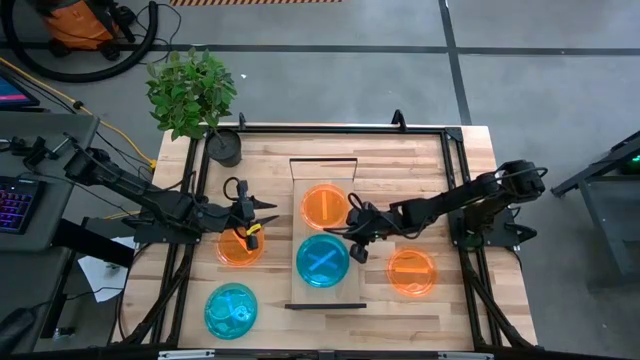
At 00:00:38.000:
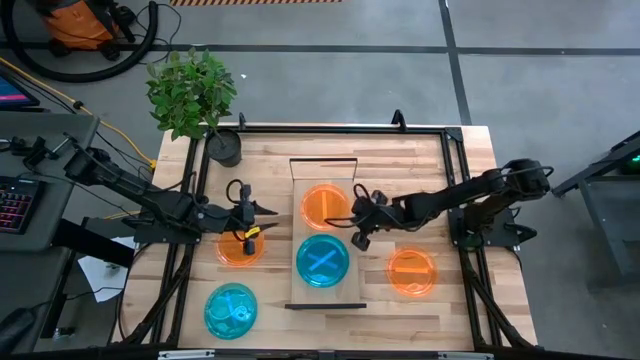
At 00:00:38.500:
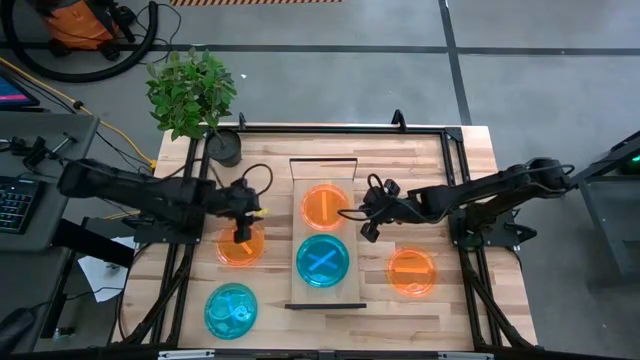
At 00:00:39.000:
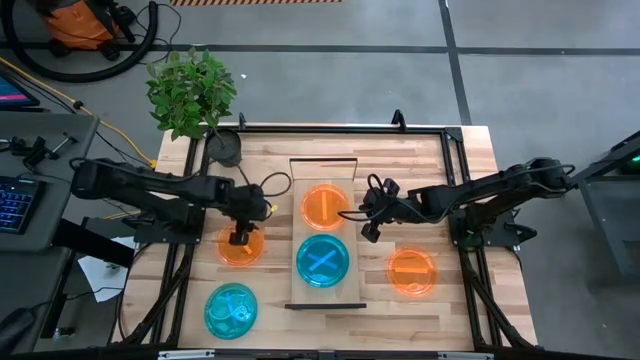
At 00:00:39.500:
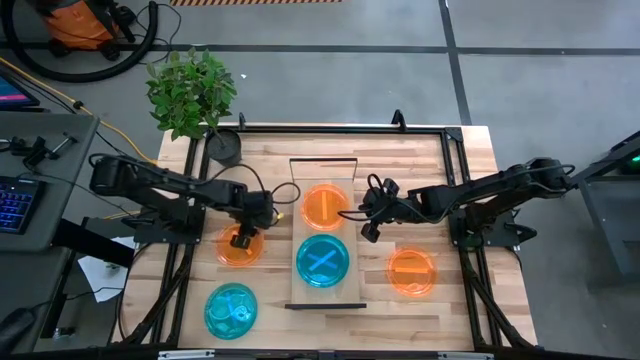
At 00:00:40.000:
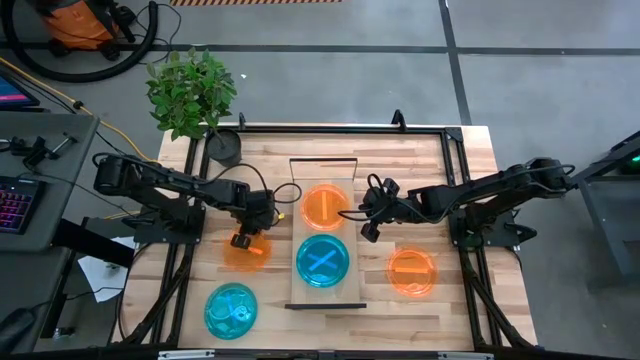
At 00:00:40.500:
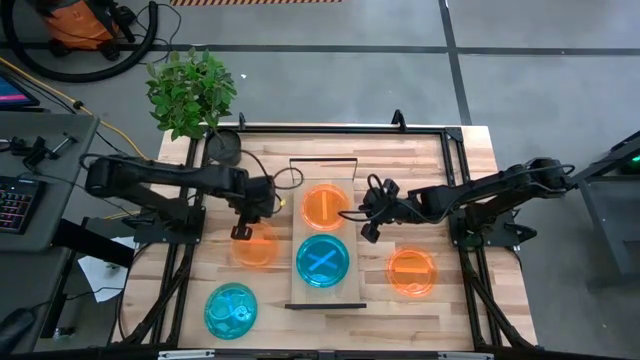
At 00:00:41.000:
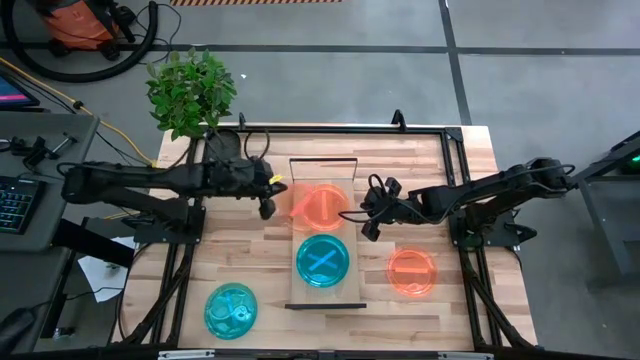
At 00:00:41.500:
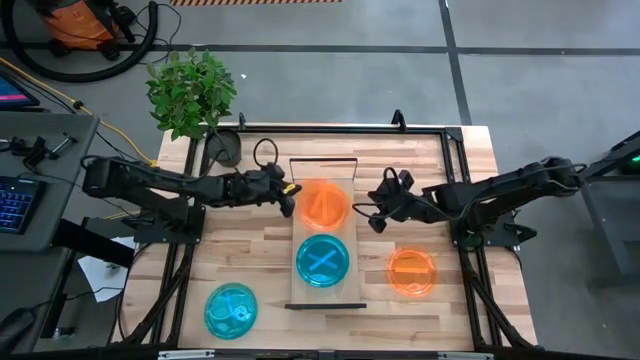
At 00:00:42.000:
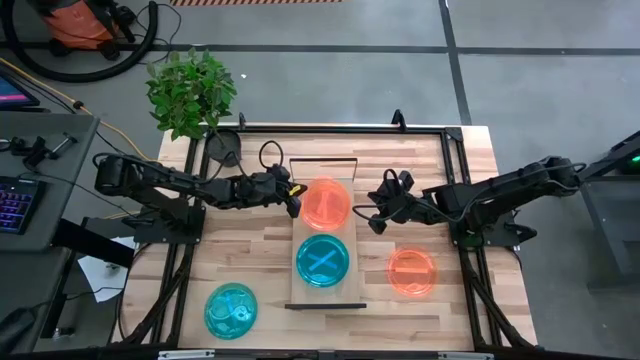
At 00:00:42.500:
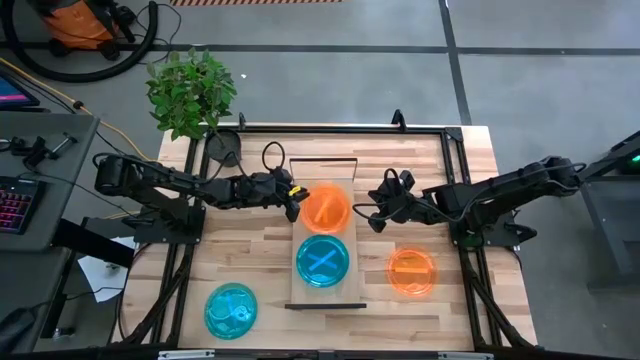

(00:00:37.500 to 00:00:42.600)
Task: Place and stack plates onto a shelf
Stack the left orange plate on top of the other orange plate on the shelf

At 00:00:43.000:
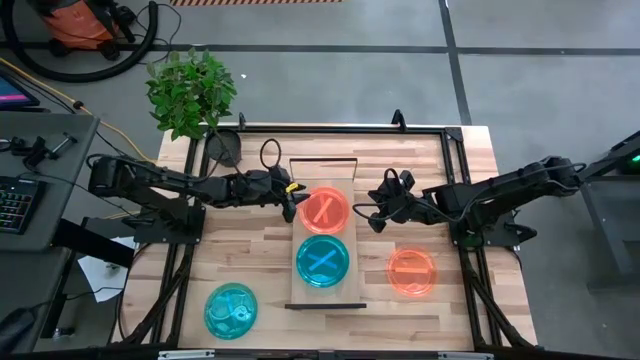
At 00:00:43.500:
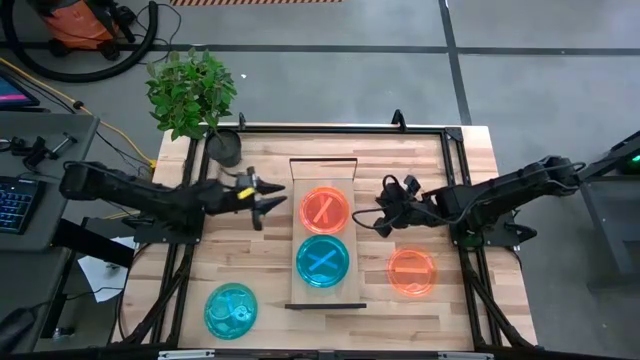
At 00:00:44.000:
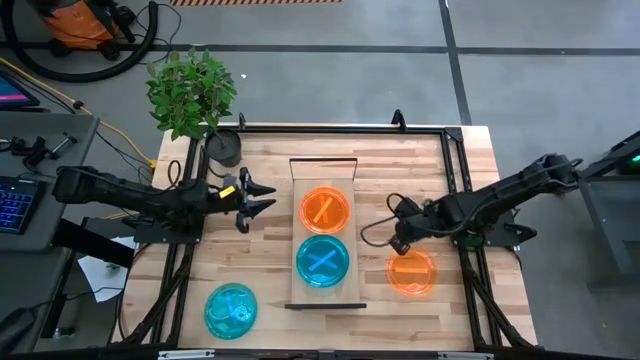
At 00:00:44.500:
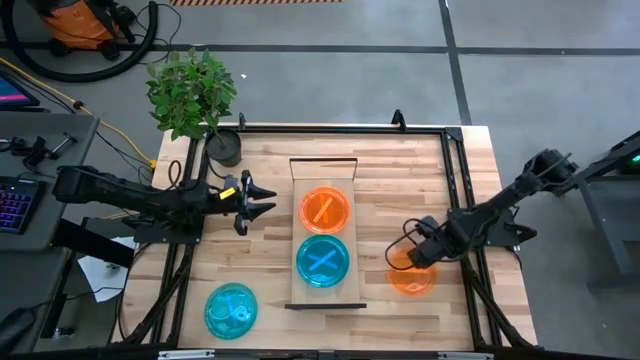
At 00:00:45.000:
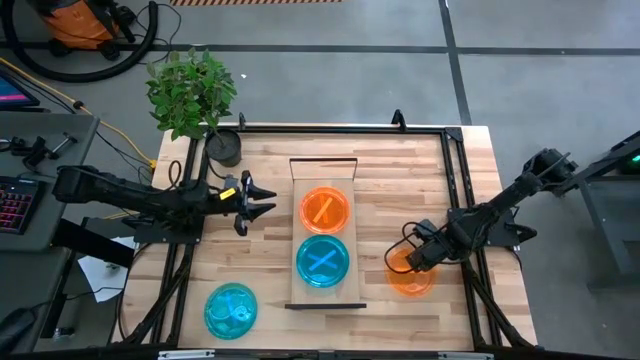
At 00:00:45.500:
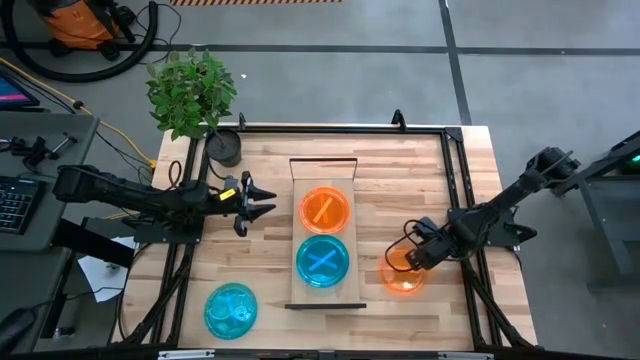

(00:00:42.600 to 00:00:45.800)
Stack the orange plate on top of the other orange plate on the shelf

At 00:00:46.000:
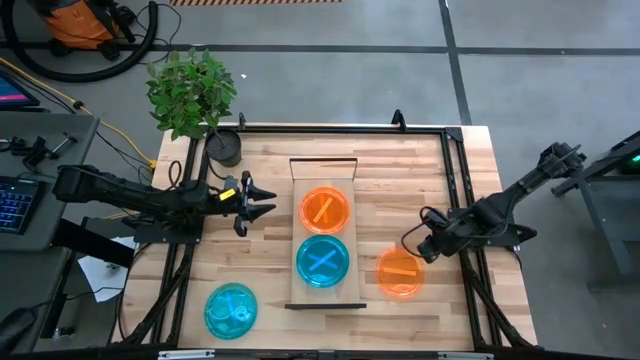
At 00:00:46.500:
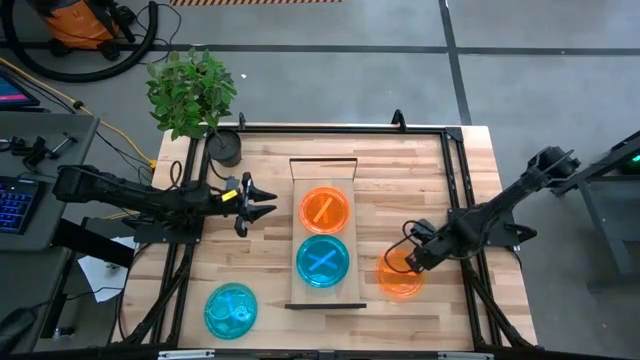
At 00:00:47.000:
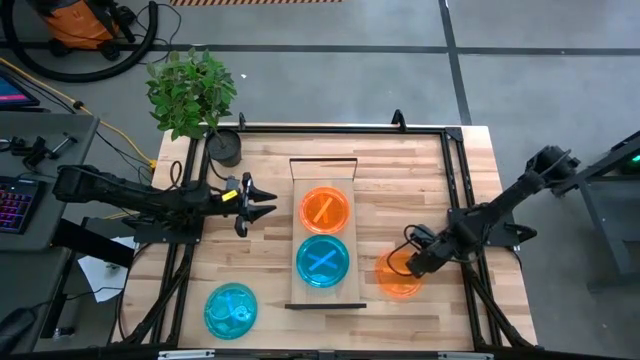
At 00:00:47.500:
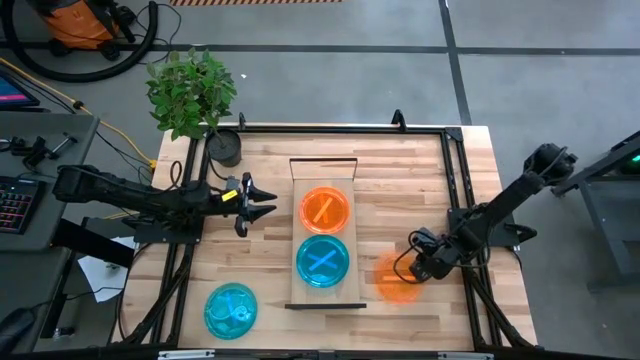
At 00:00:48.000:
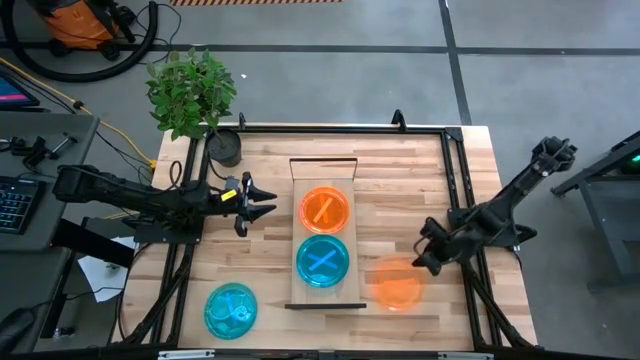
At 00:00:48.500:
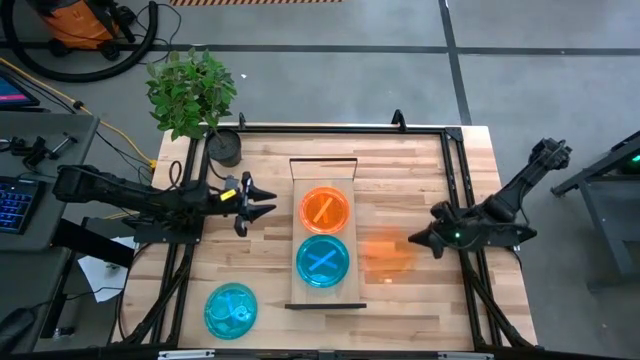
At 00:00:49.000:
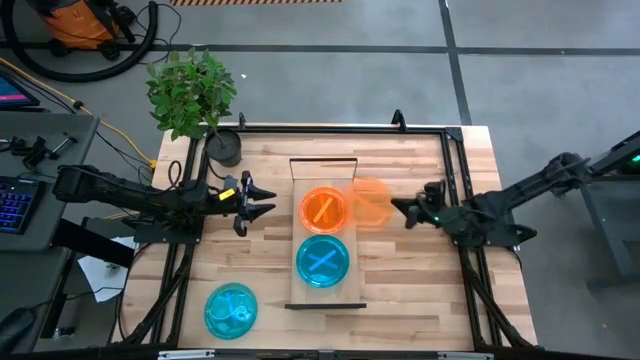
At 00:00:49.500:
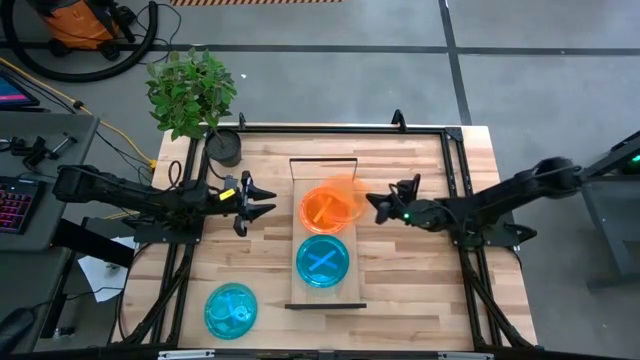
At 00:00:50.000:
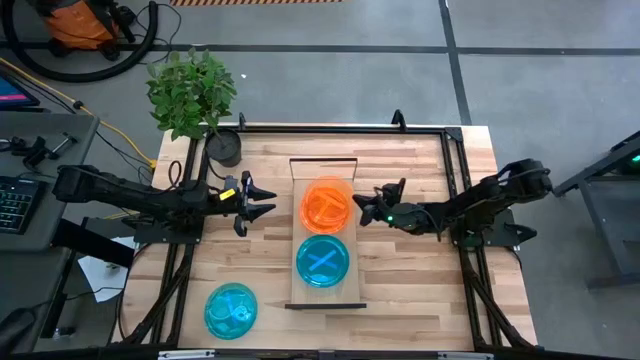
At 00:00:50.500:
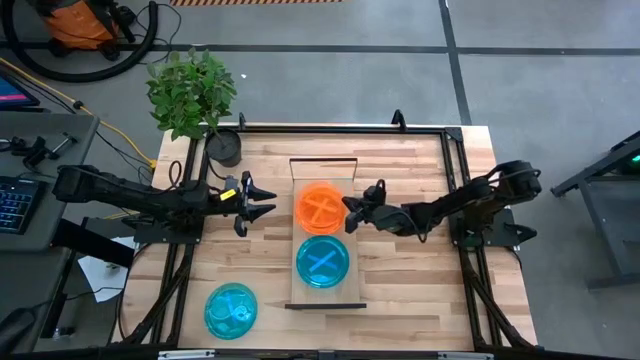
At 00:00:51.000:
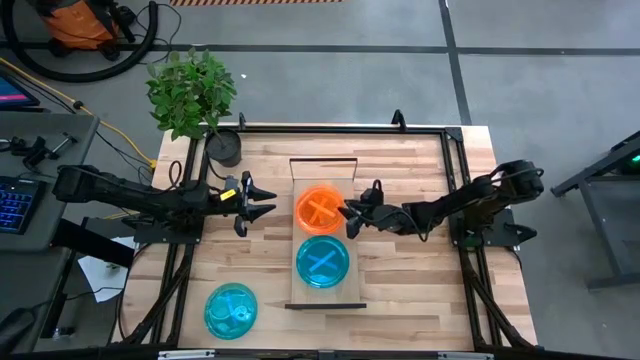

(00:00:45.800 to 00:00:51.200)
Stack the orange plate on top of the other orange plate on the shelf

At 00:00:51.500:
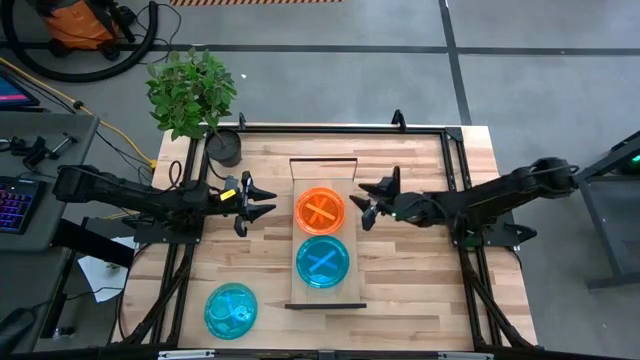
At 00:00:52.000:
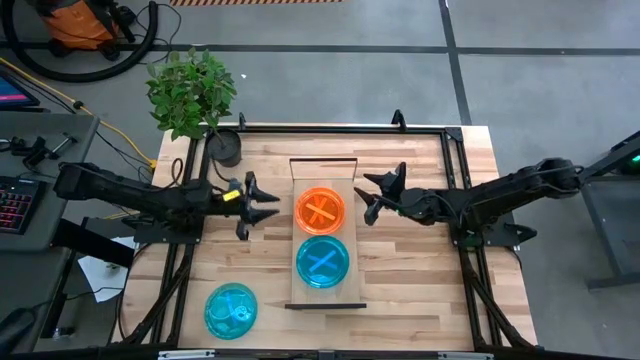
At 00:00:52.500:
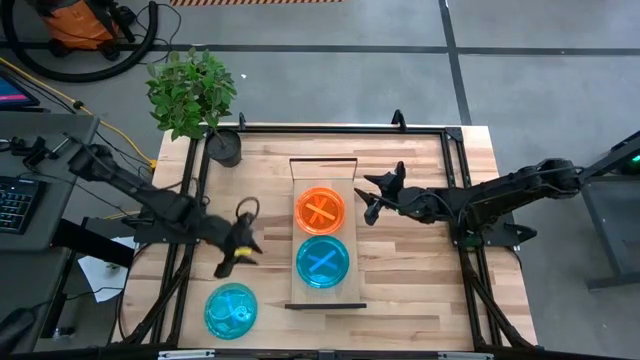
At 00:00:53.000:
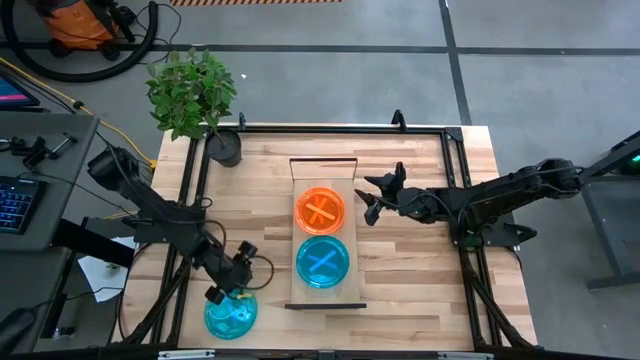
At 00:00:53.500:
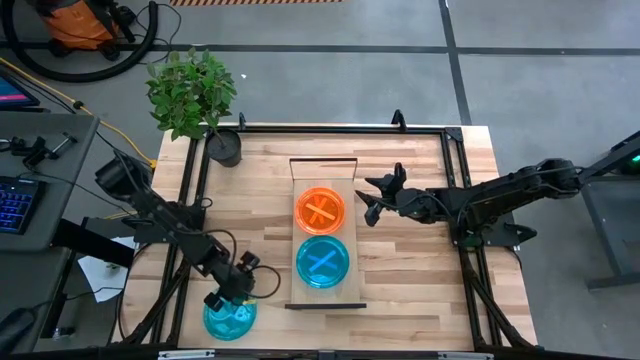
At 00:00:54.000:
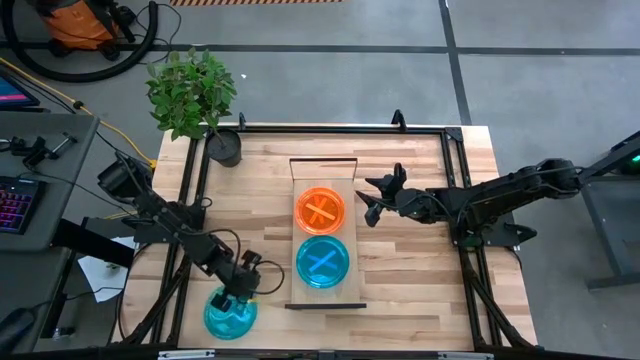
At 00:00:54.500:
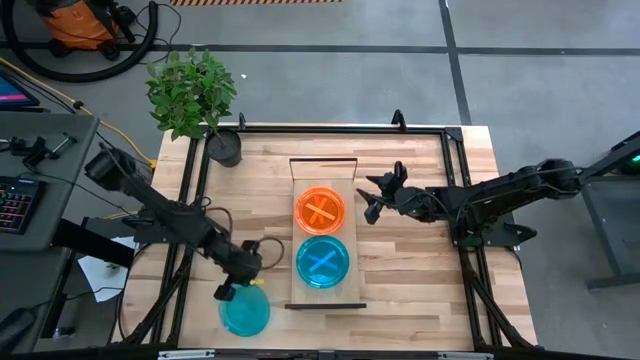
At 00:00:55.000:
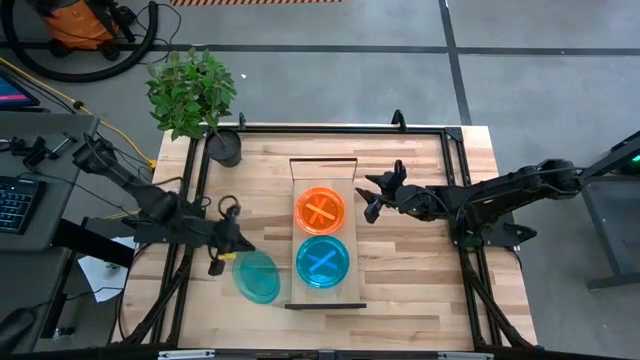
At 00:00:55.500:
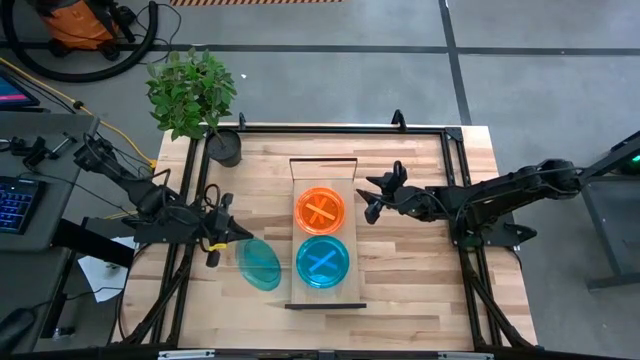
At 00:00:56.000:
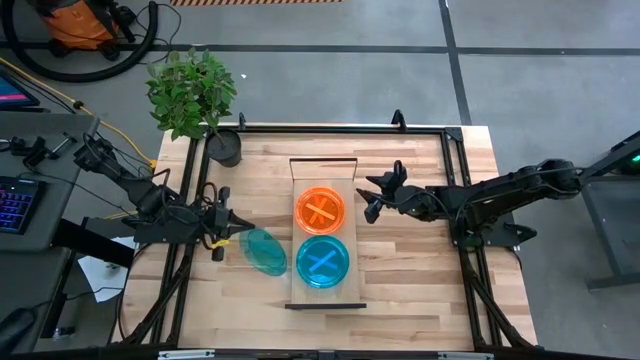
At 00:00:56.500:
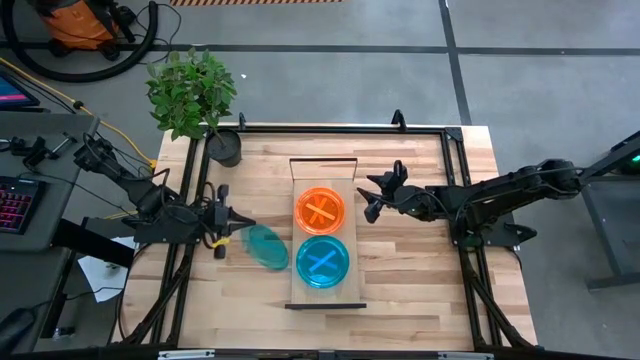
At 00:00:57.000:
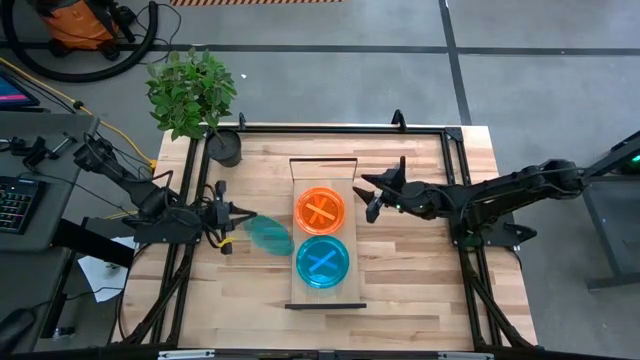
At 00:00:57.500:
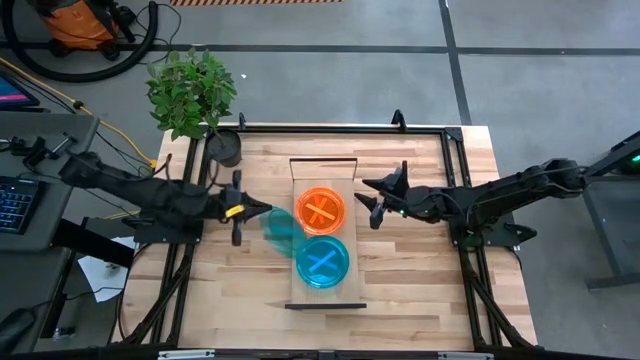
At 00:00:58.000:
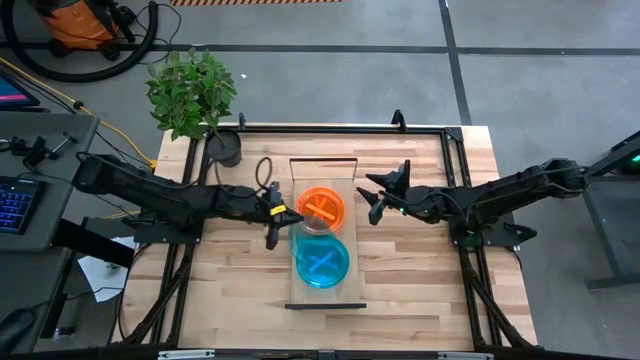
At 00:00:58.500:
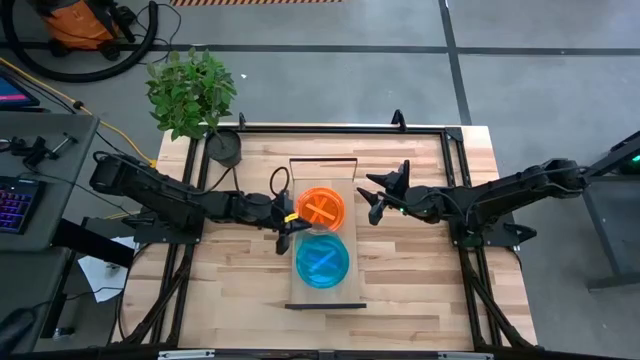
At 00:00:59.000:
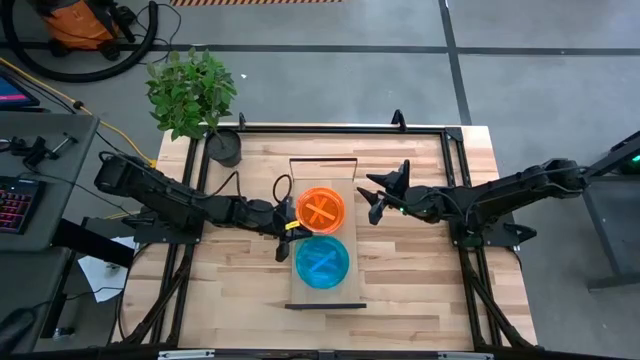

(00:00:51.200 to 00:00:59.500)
Stack the blue plate on top of the other blue plate on the shelf
